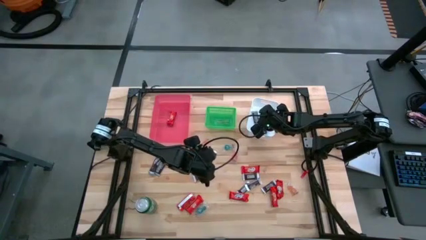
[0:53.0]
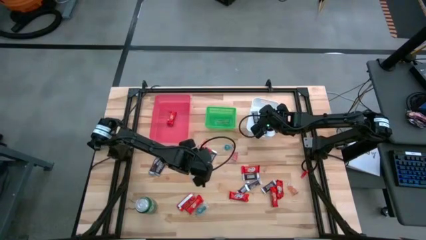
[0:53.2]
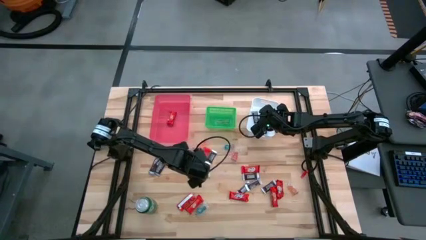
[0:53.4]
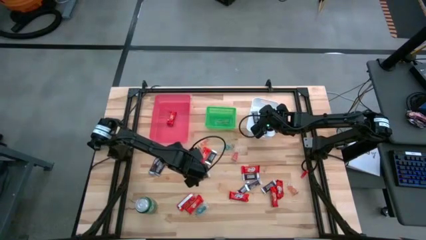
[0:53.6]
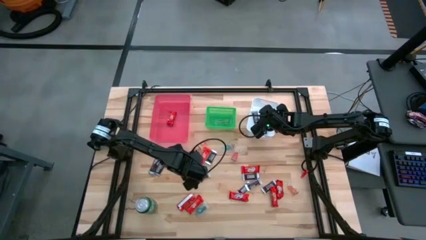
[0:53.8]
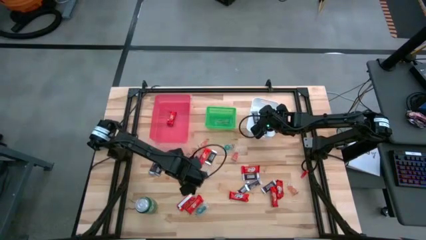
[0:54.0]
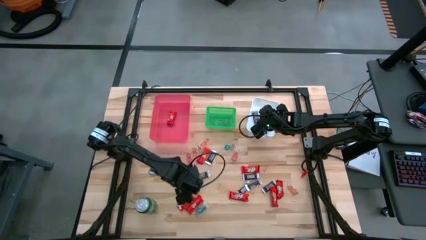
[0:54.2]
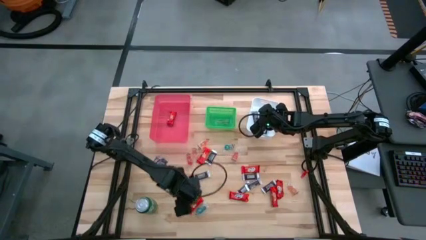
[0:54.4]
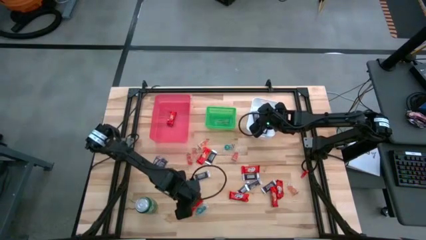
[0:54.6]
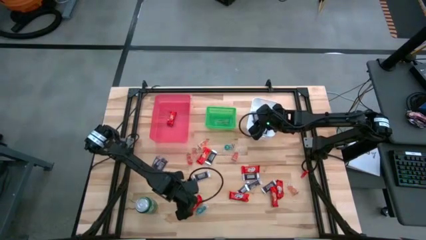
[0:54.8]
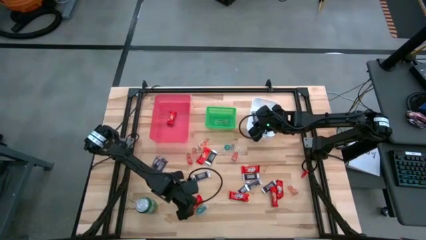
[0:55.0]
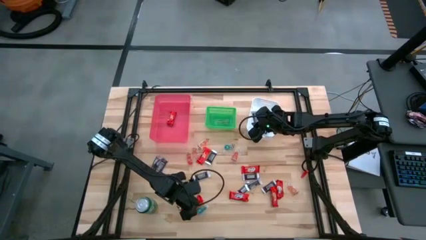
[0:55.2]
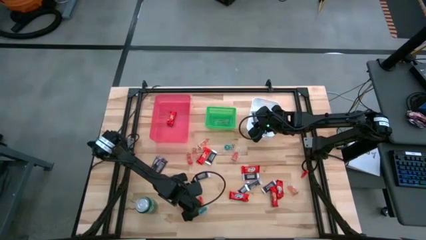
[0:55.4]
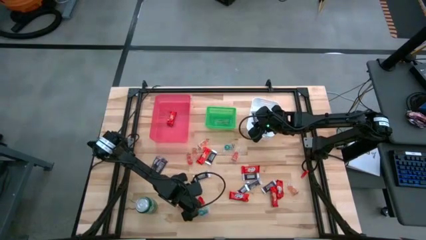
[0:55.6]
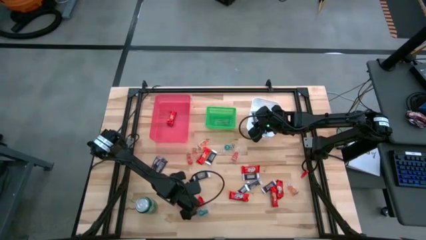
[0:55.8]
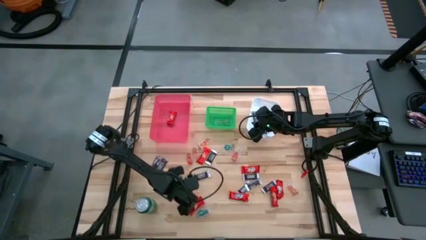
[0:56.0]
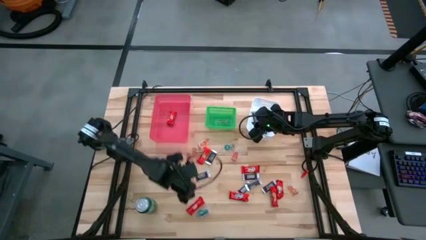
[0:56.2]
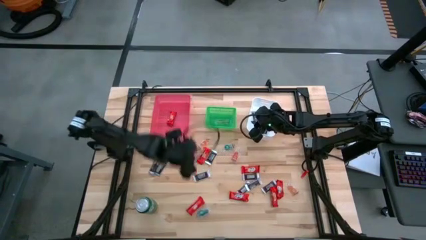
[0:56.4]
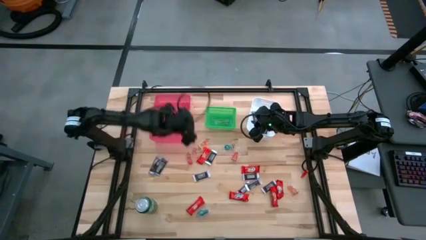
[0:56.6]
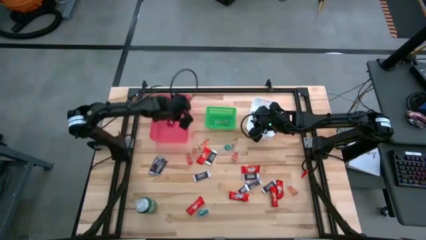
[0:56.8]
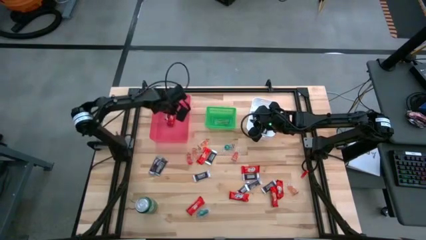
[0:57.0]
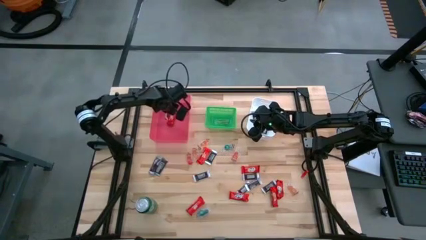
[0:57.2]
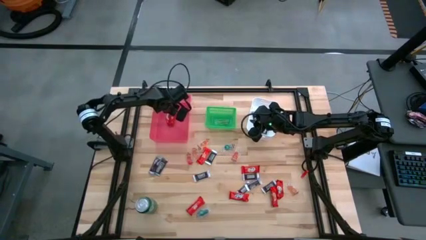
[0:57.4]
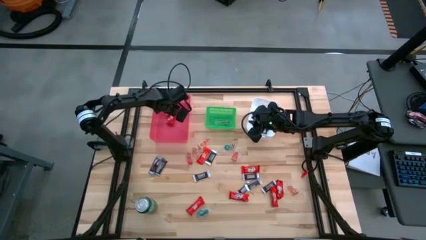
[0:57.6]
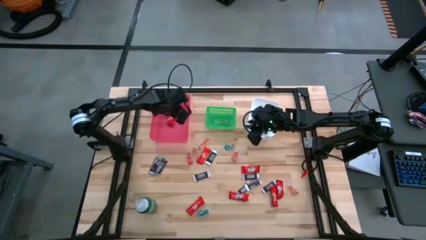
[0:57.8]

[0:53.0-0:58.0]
Task: Sort candy
Put the red chocolate bar into the pink bin

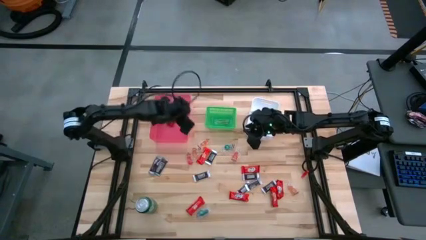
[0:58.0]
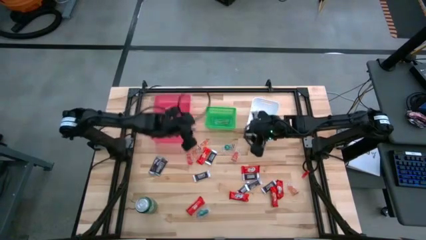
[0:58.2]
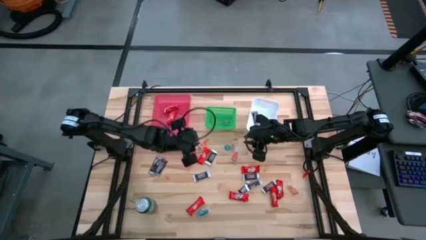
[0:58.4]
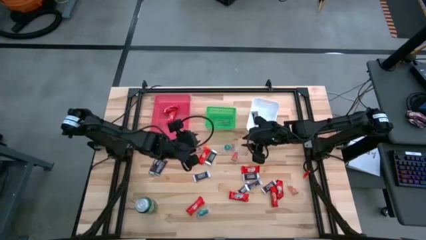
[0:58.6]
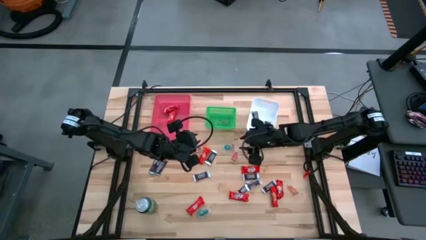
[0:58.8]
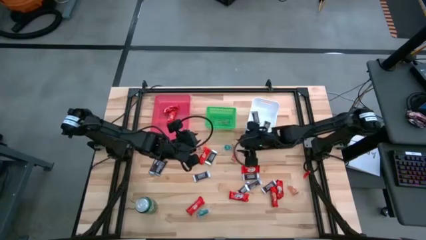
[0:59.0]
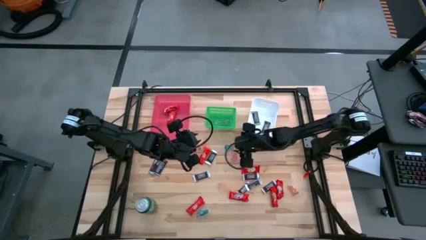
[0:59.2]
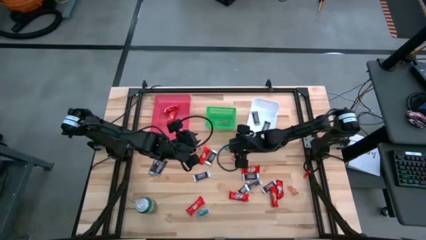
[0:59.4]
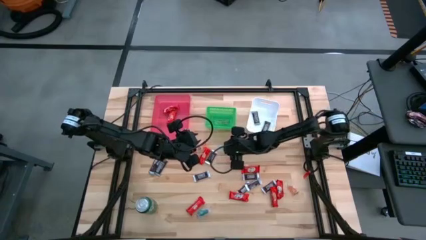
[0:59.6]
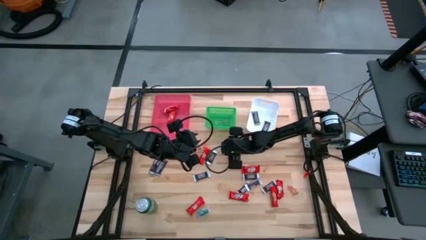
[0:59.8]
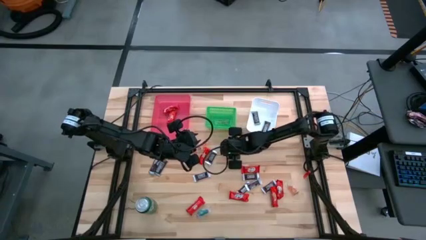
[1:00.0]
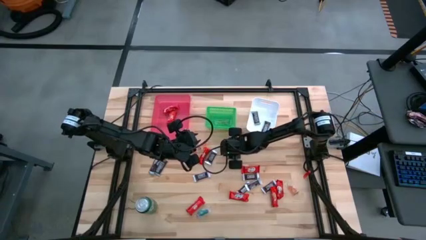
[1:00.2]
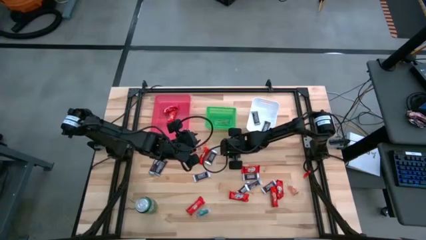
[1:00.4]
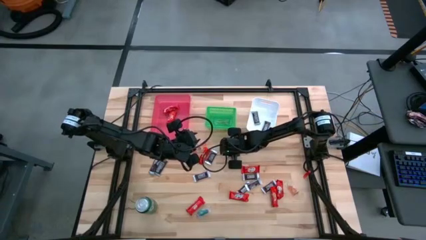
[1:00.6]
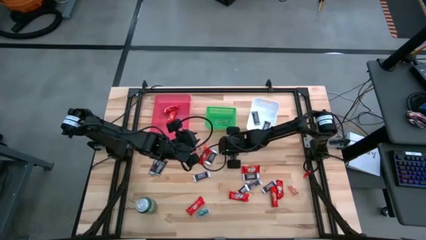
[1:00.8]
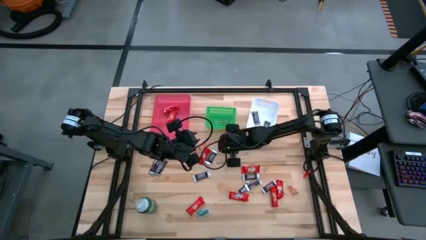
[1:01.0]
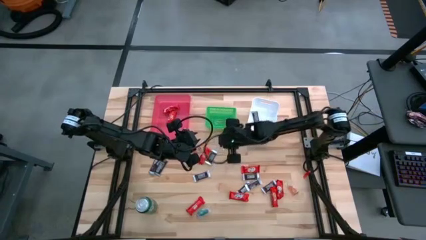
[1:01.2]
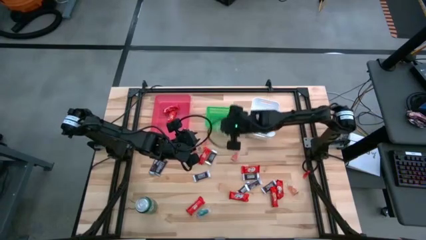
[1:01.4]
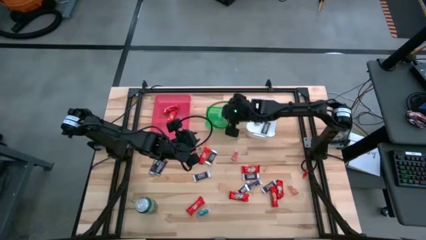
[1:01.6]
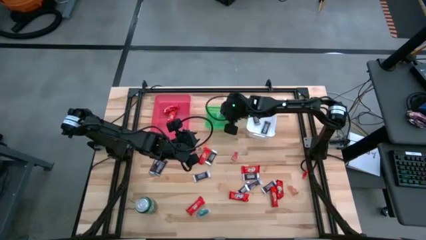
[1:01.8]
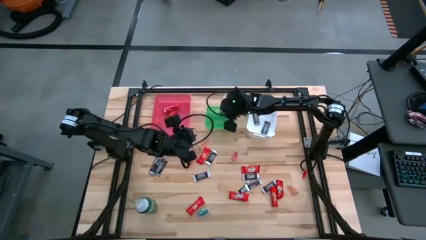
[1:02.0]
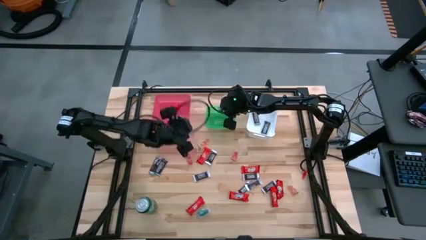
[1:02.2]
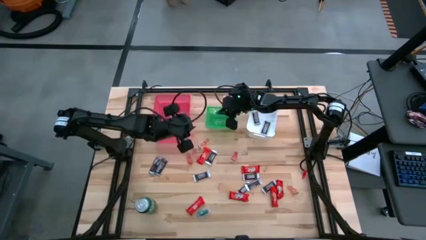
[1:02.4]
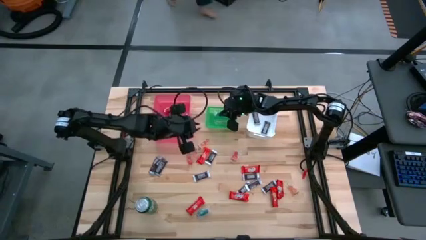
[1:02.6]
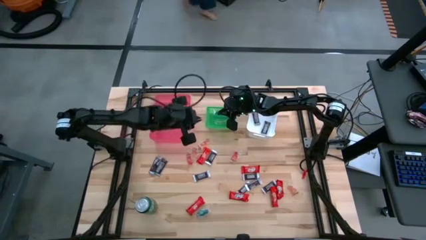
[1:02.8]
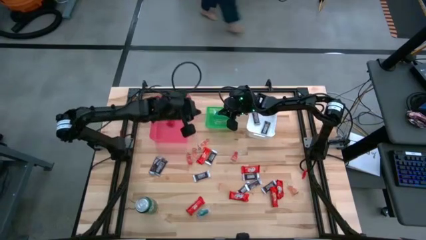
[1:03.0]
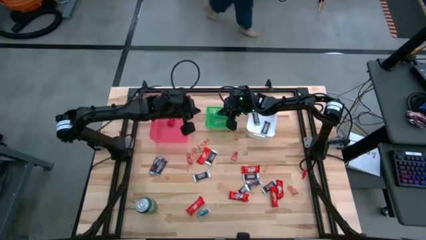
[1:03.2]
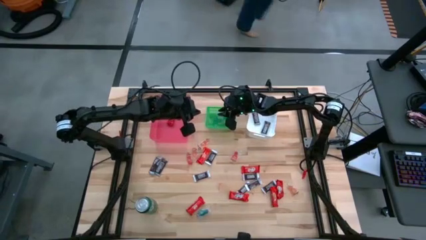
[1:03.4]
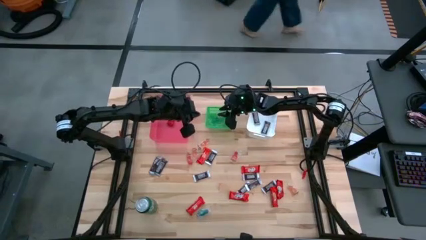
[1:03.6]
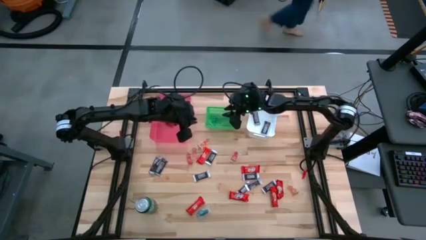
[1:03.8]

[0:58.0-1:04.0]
Put the blue gummy into the green bin

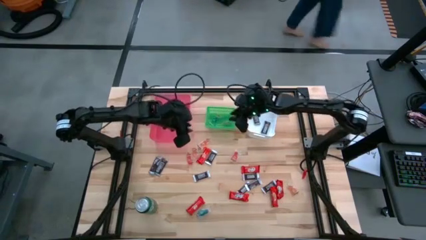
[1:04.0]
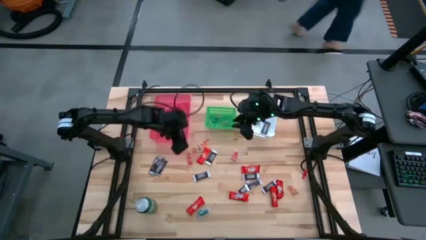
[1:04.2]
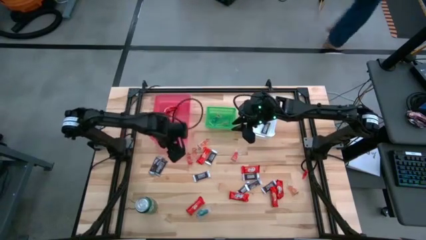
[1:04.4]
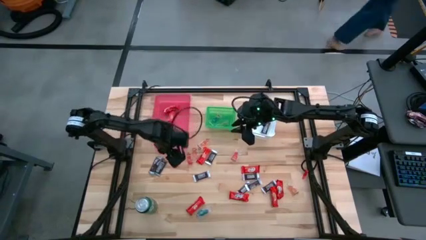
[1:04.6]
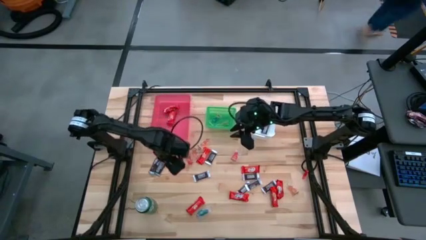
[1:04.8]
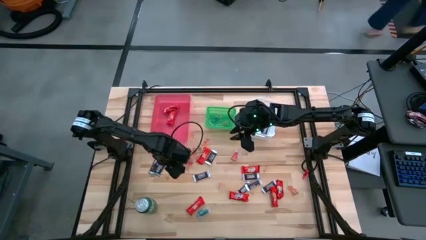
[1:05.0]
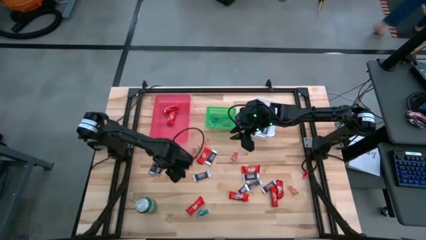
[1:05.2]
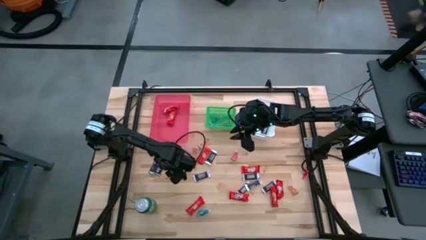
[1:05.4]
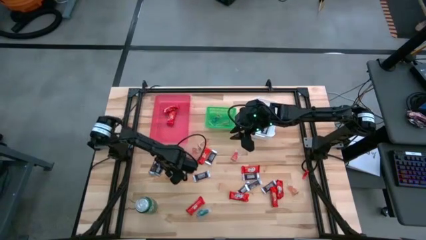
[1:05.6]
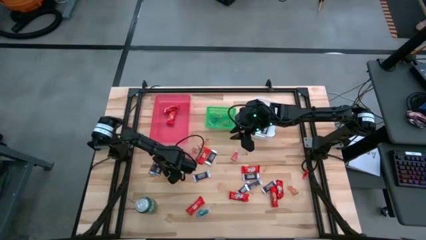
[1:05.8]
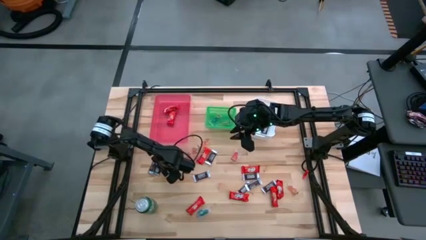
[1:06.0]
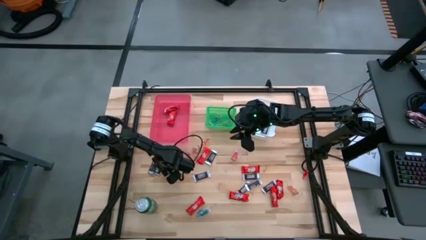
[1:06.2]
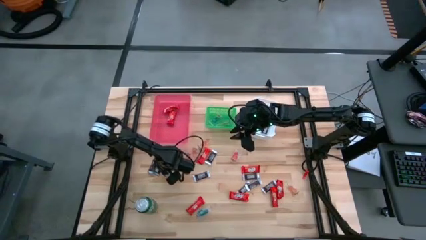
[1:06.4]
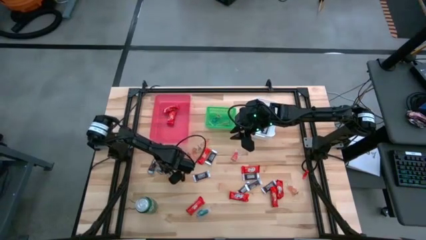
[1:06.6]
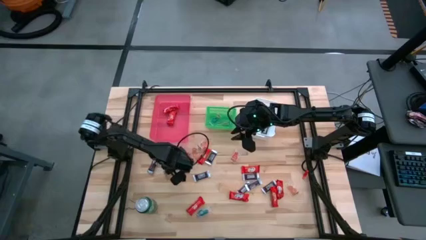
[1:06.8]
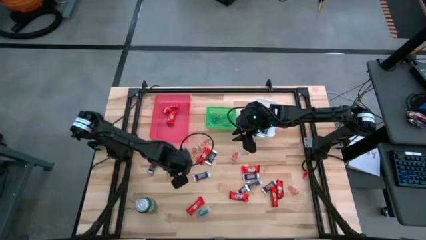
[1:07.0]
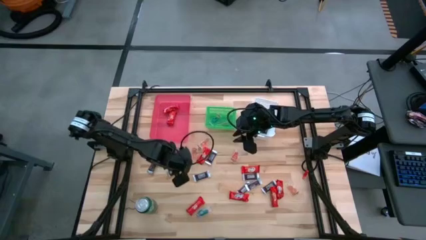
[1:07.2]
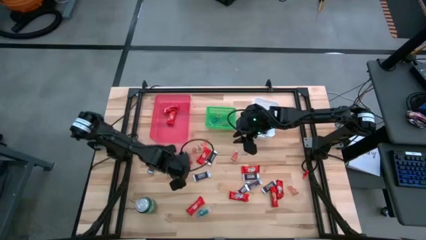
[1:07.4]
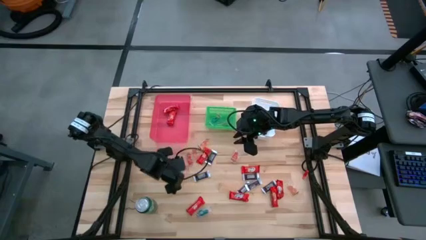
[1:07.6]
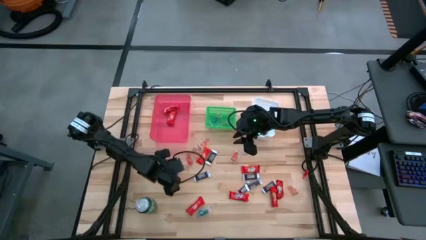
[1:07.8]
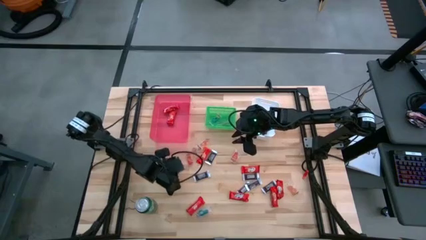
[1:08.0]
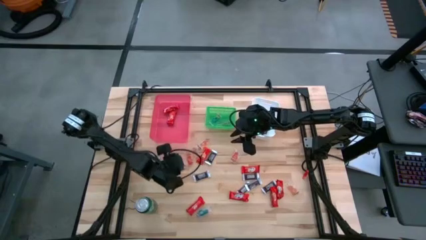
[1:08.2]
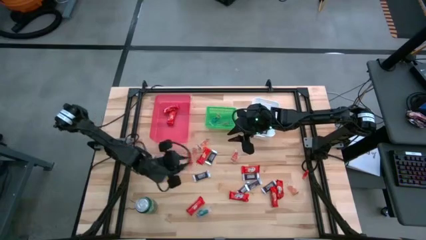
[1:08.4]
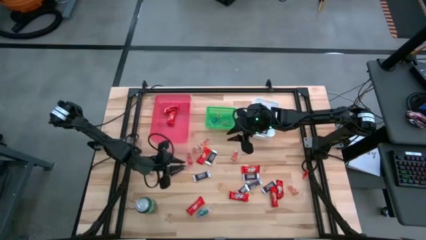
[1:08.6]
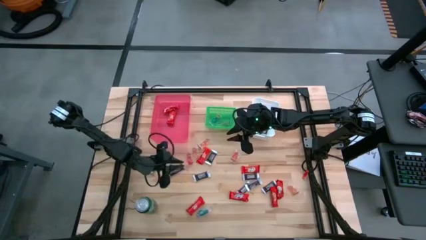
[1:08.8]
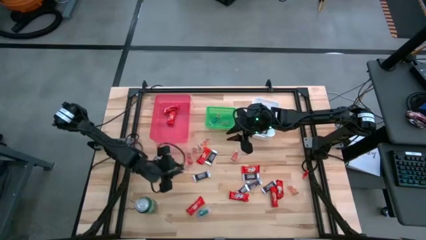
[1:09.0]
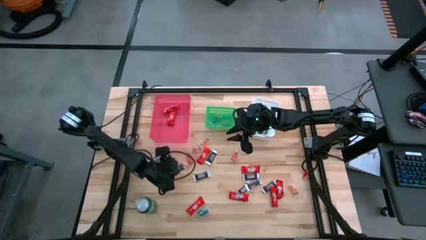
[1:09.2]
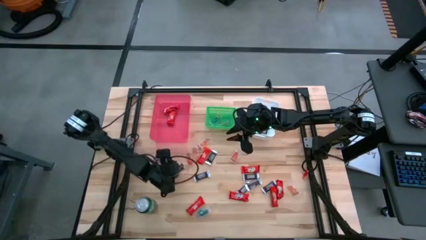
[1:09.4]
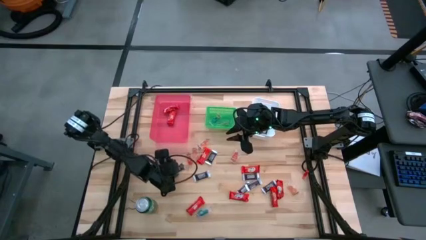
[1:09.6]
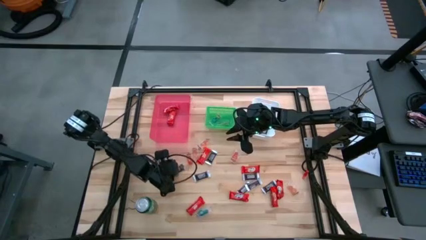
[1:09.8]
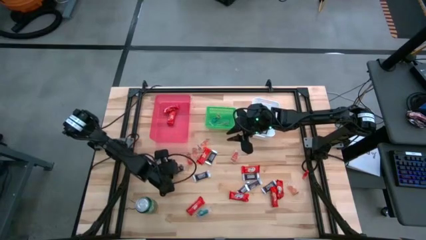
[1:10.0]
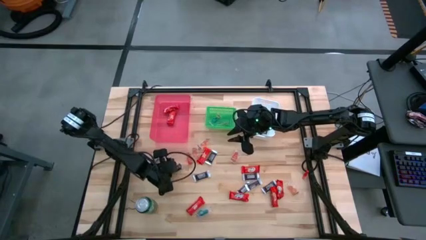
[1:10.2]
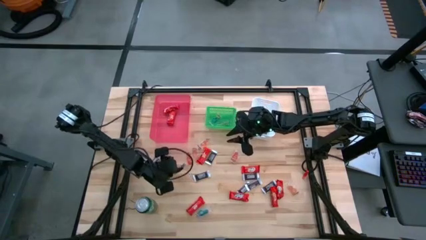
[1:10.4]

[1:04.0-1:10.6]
Put the brown chocolate bar into the white bin
